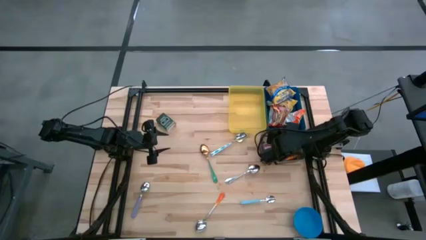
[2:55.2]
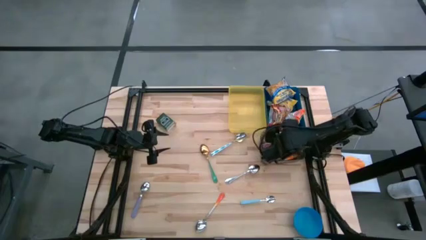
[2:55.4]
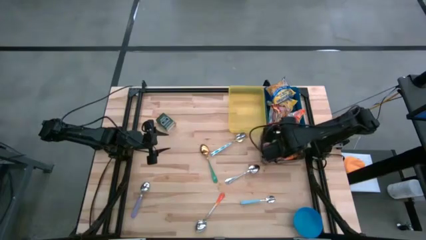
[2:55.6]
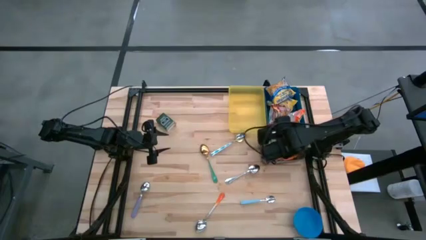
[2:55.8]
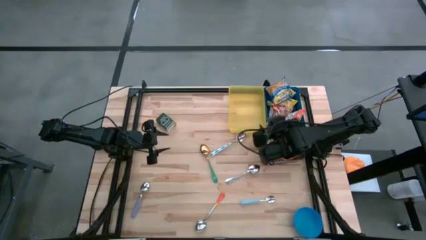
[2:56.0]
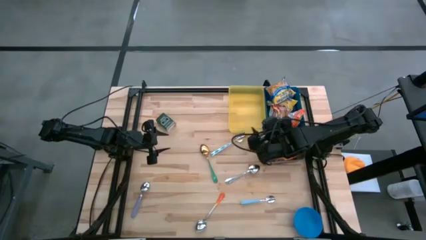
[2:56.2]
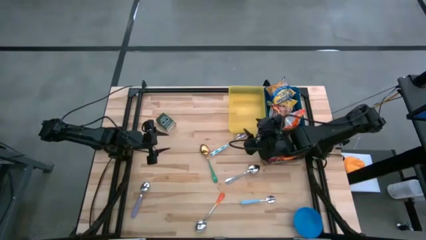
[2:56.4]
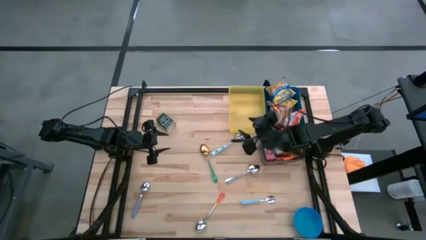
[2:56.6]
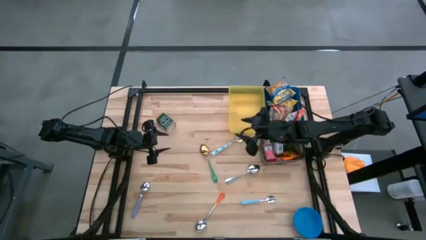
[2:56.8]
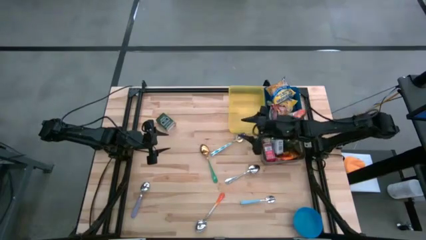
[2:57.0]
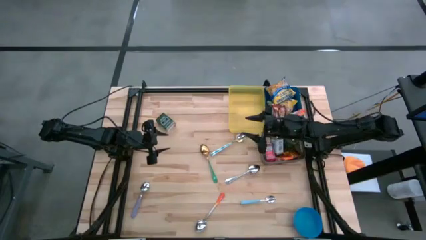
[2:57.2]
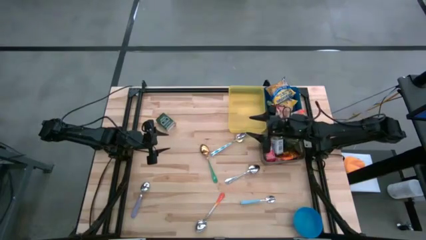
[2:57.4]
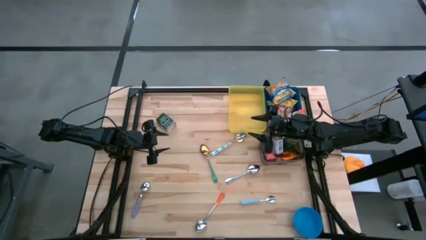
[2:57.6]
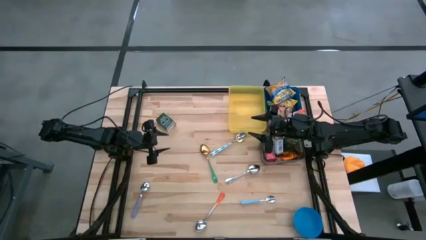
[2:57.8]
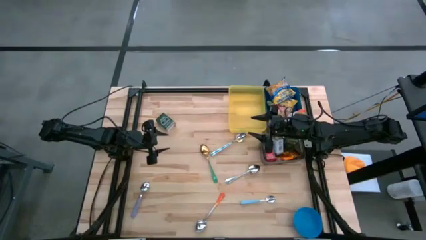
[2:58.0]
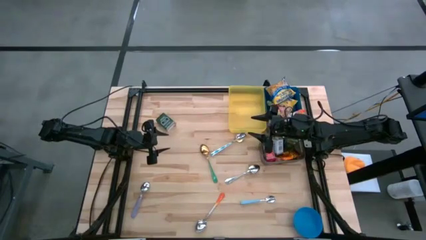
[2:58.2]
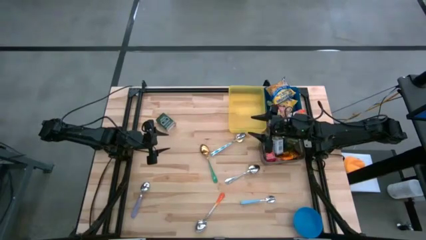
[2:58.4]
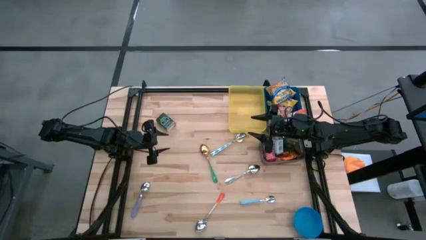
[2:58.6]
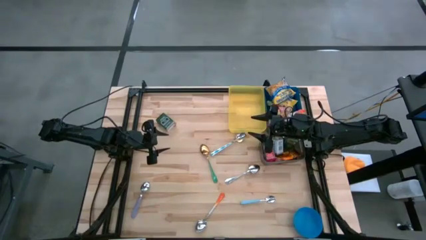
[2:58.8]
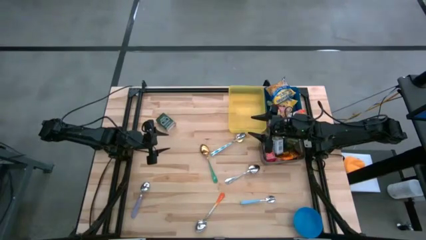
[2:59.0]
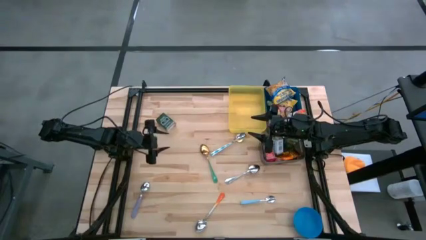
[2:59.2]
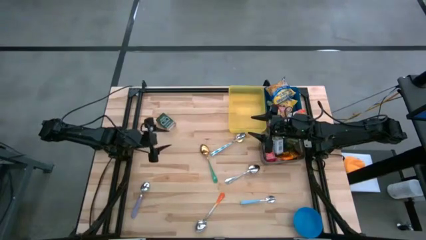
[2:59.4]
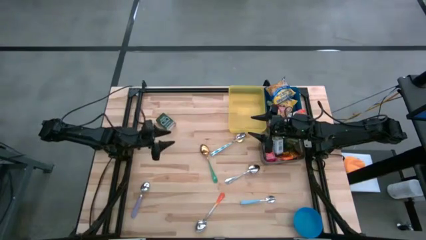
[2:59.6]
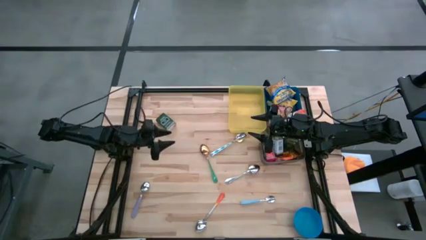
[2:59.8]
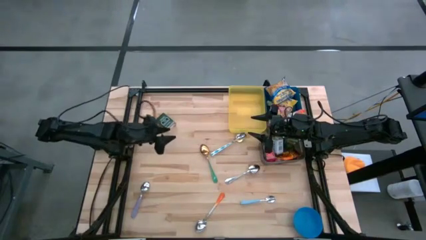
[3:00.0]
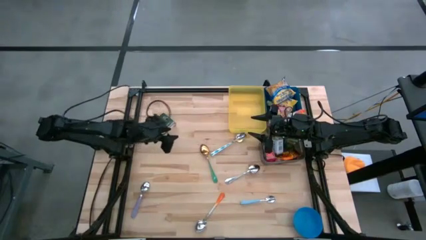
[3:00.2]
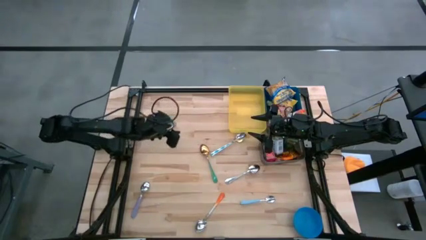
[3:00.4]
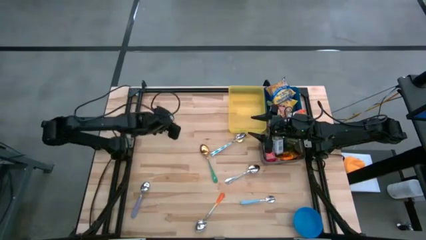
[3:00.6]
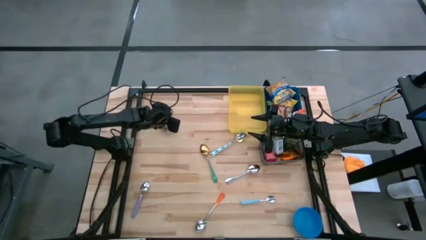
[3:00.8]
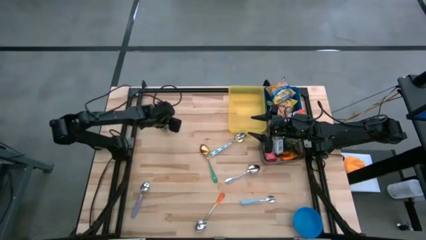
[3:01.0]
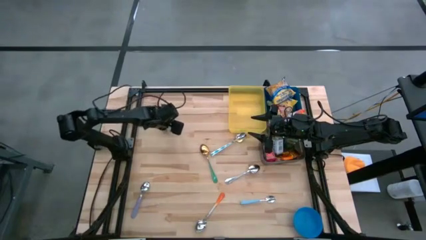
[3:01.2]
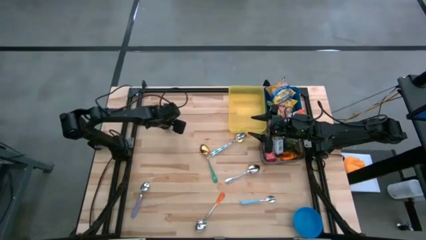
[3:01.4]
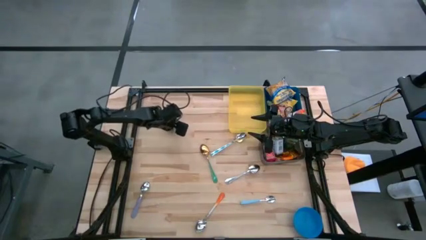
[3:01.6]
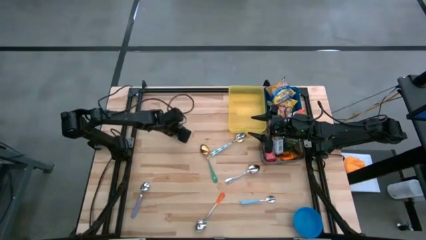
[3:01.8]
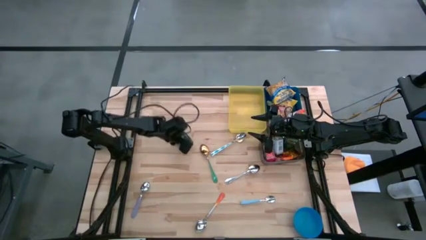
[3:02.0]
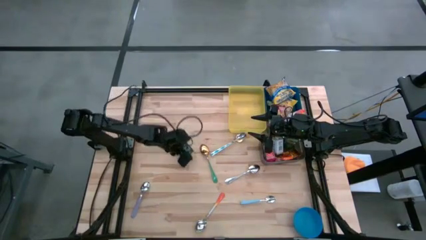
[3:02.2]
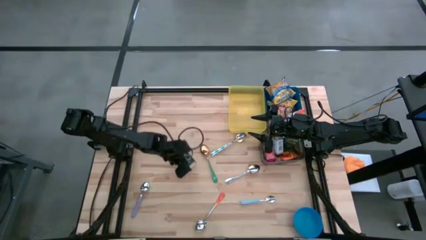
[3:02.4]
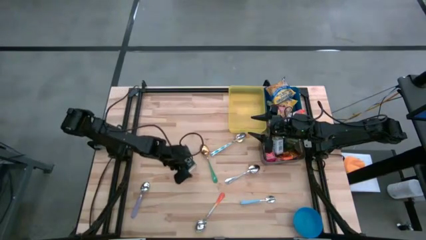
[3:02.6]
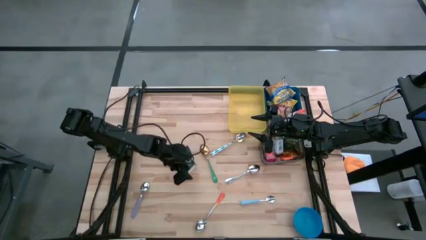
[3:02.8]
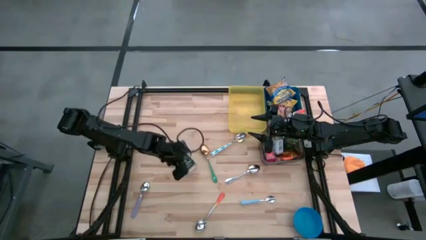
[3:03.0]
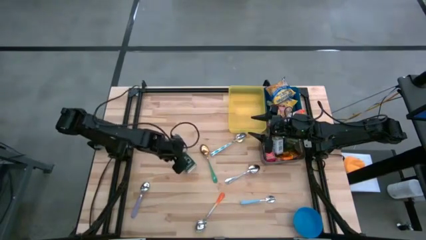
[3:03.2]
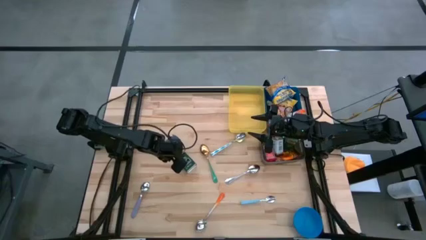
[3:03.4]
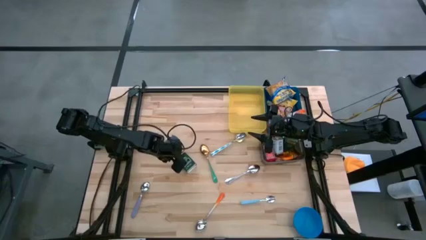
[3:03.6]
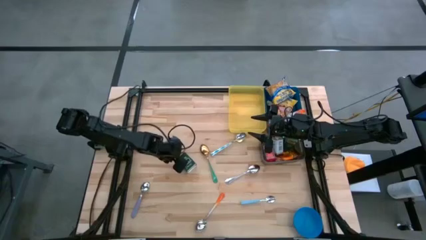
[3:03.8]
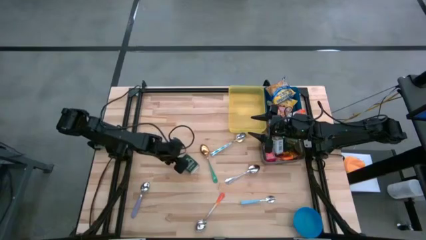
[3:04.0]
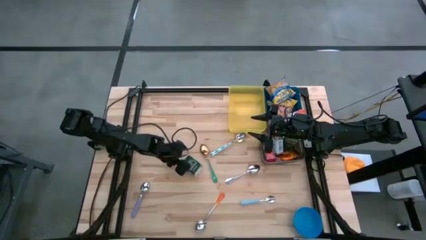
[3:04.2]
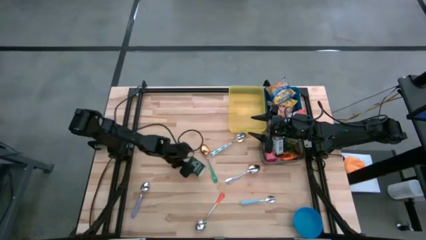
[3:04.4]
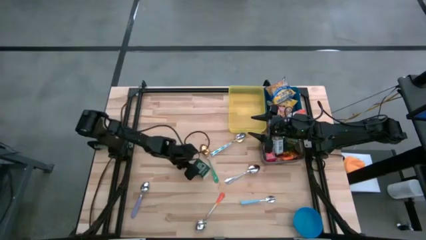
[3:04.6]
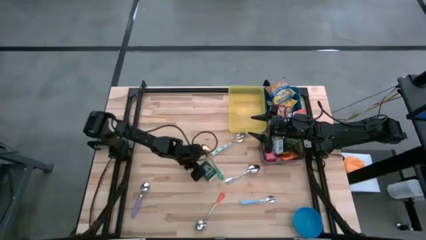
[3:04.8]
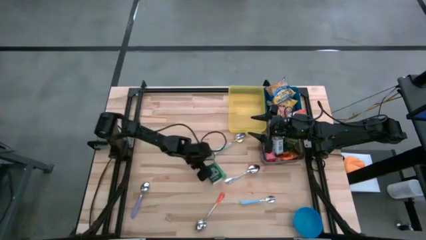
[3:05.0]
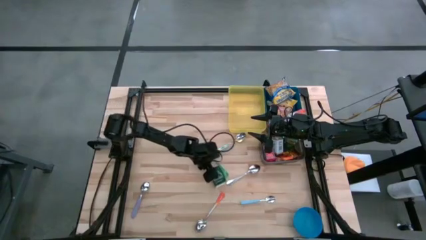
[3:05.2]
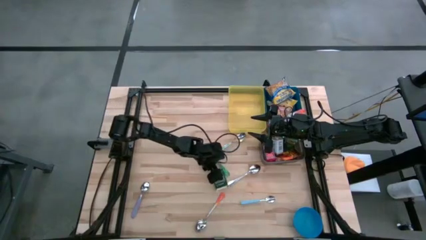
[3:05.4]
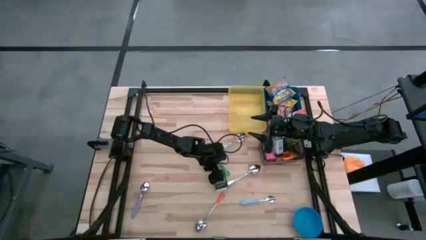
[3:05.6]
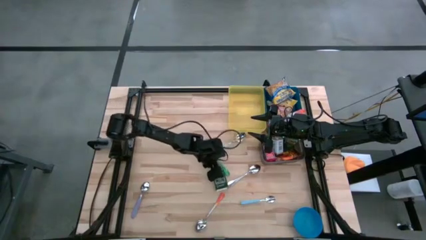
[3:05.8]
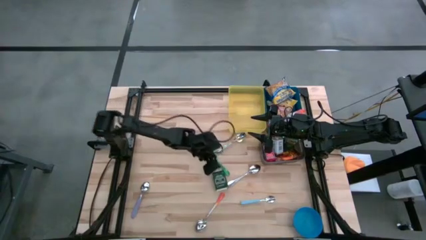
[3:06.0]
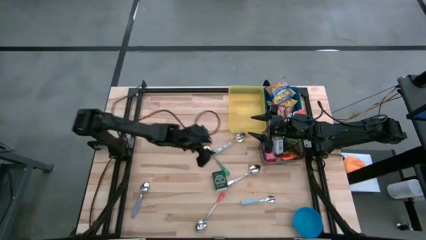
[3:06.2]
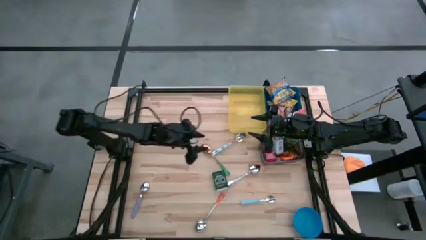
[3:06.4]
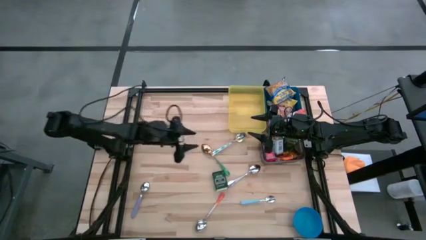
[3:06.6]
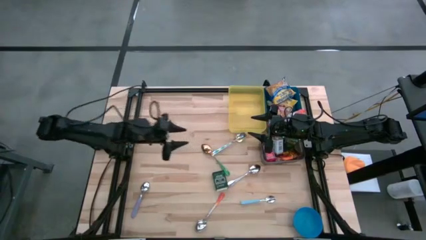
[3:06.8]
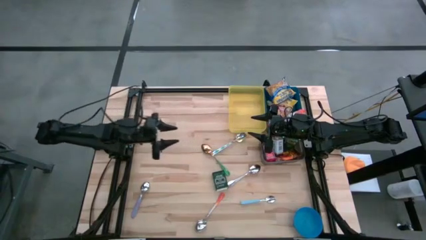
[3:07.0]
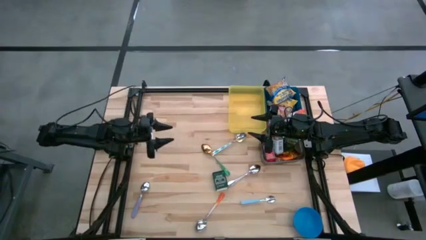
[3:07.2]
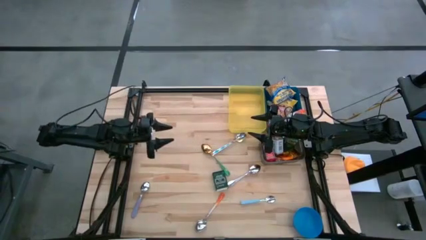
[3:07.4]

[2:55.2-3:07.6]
Put the black seasoning can into the black bin
